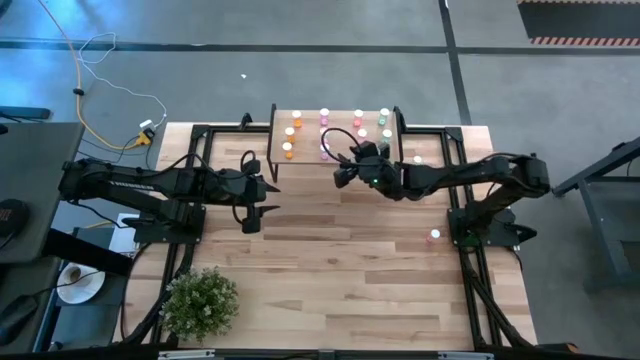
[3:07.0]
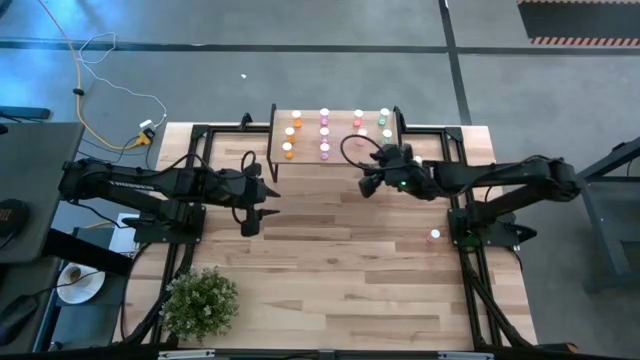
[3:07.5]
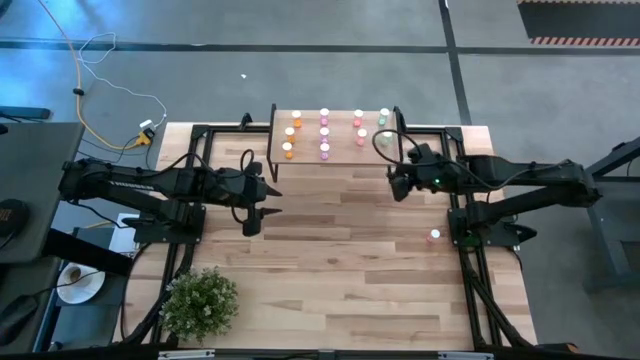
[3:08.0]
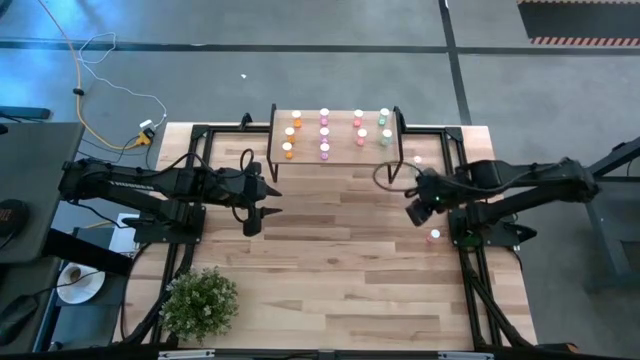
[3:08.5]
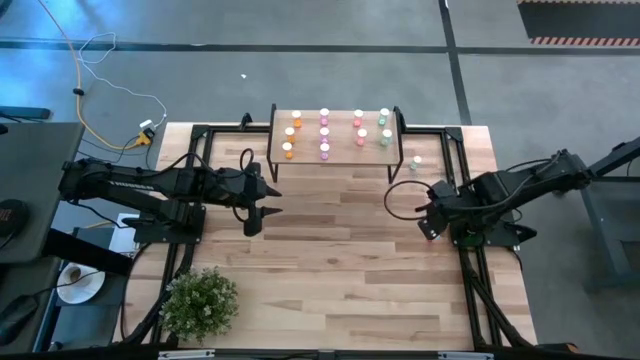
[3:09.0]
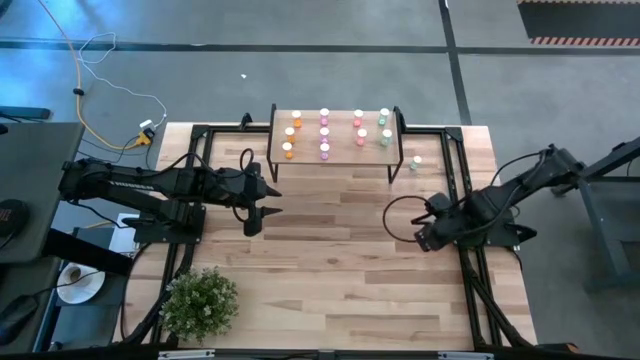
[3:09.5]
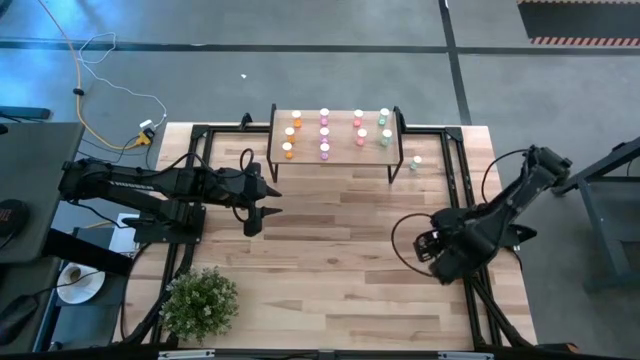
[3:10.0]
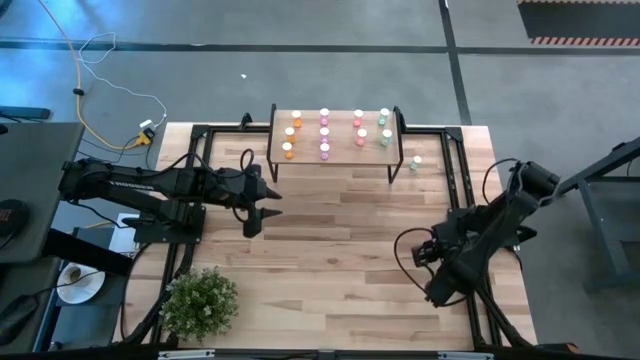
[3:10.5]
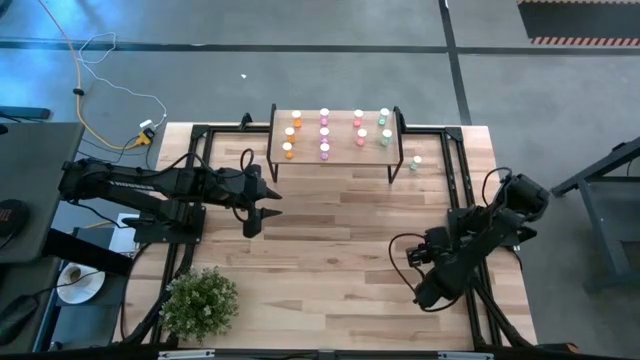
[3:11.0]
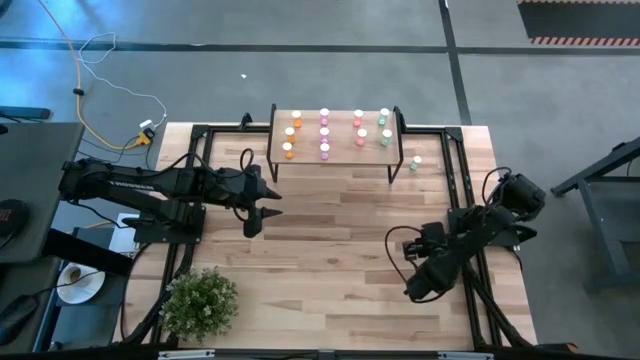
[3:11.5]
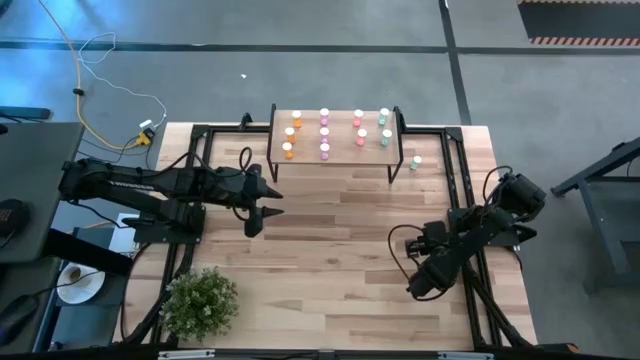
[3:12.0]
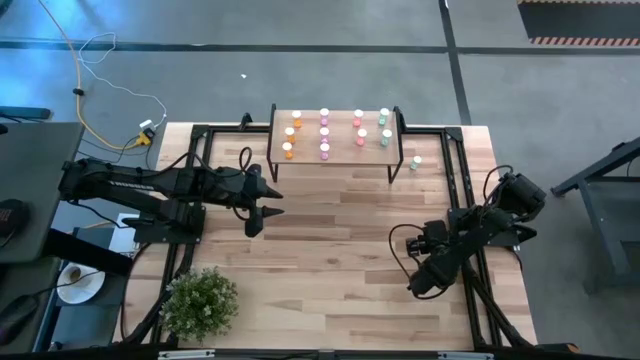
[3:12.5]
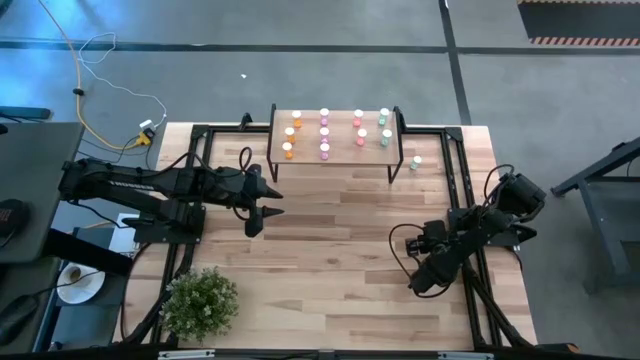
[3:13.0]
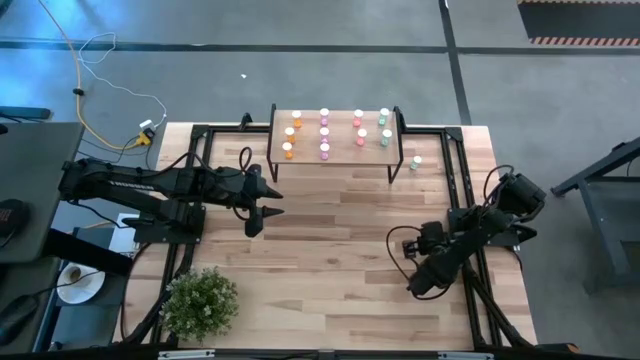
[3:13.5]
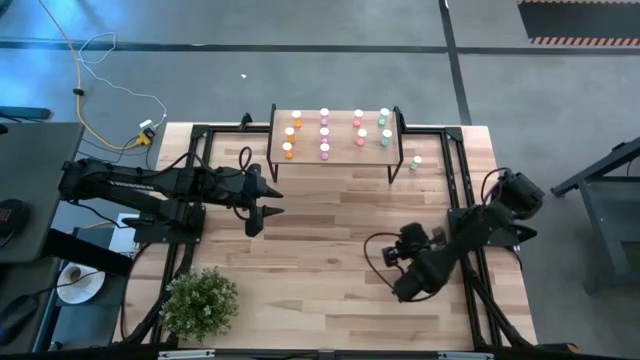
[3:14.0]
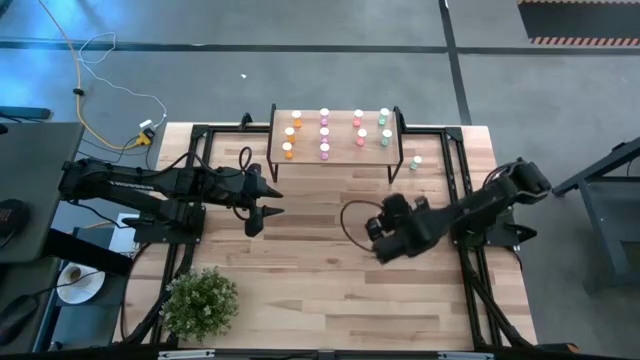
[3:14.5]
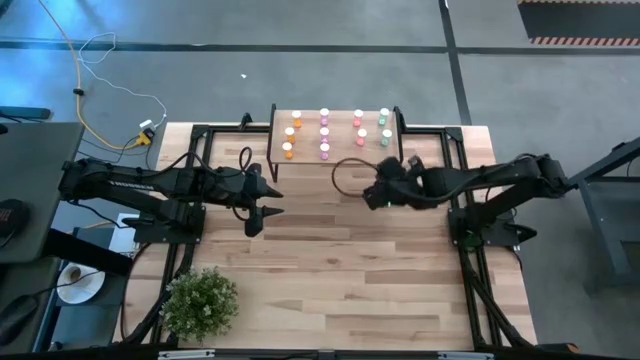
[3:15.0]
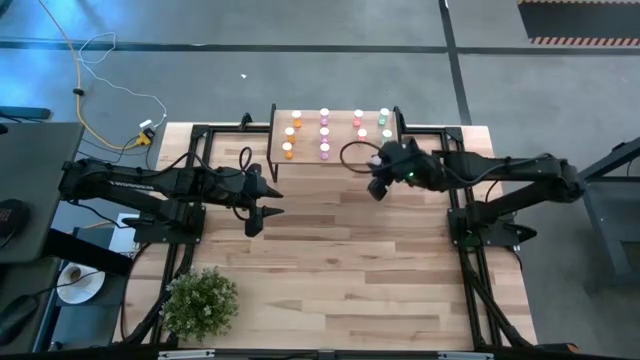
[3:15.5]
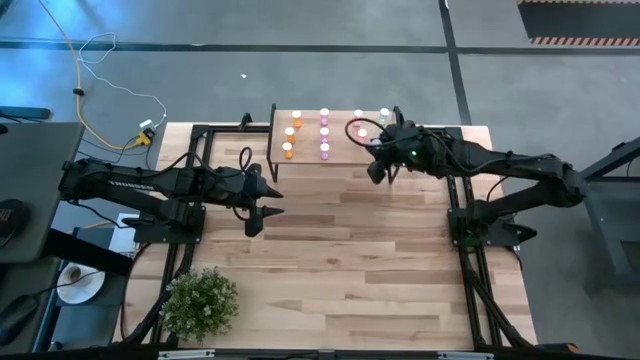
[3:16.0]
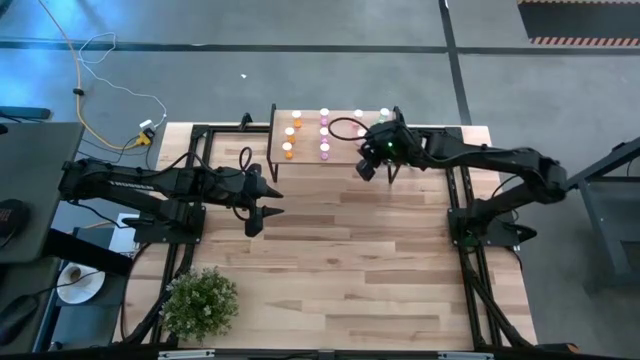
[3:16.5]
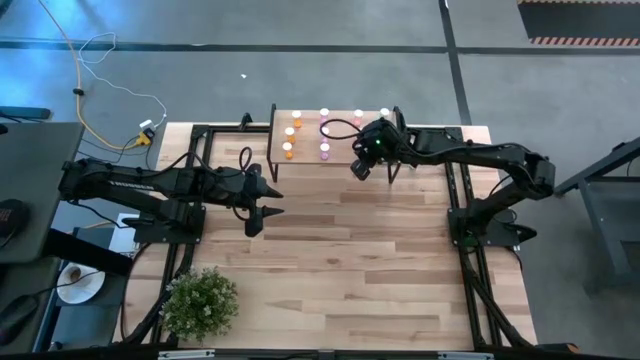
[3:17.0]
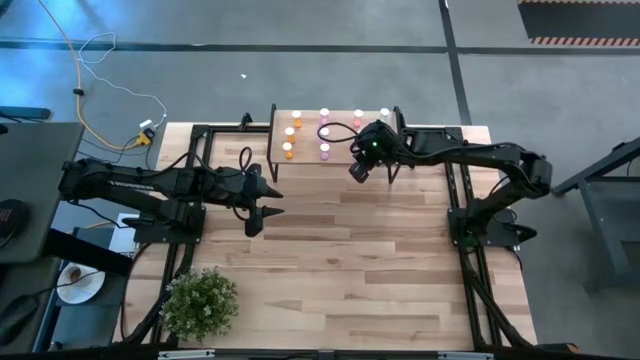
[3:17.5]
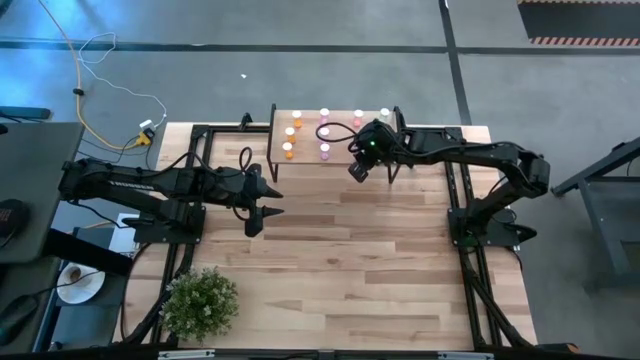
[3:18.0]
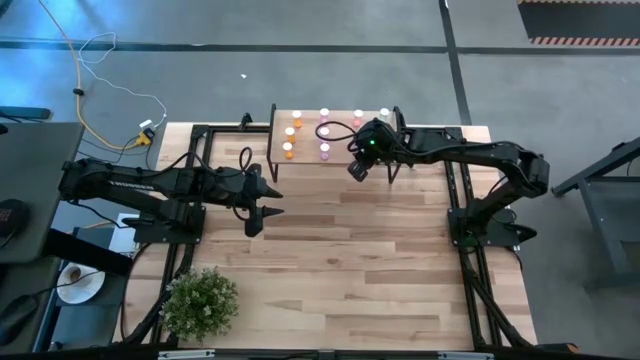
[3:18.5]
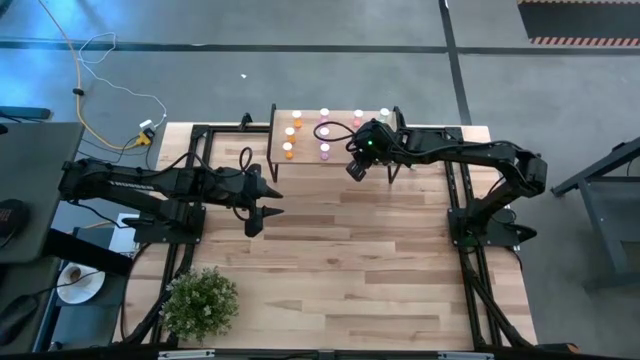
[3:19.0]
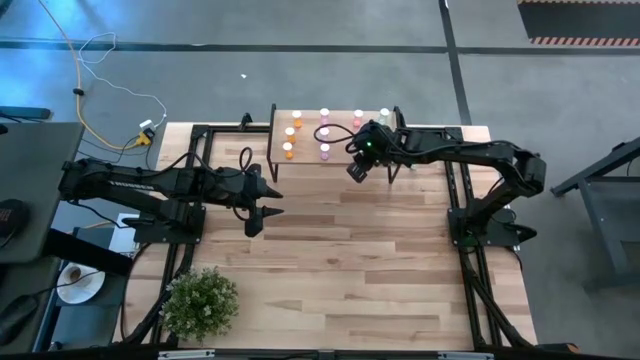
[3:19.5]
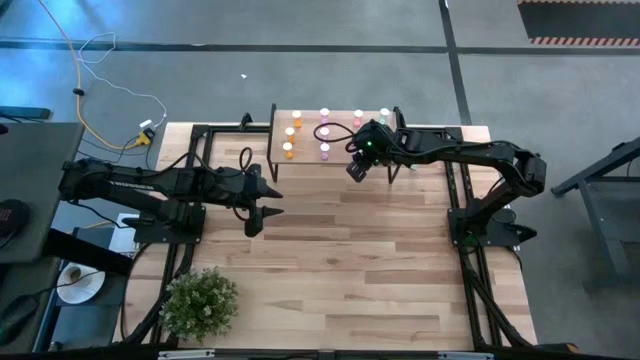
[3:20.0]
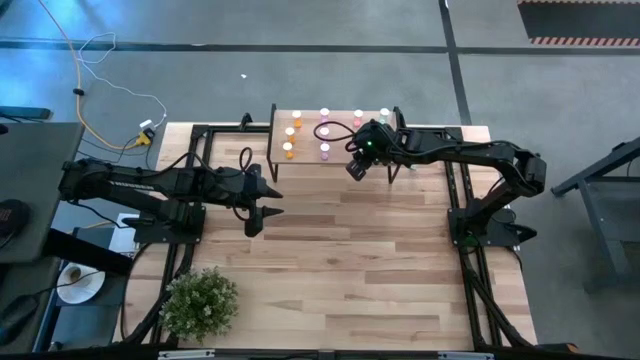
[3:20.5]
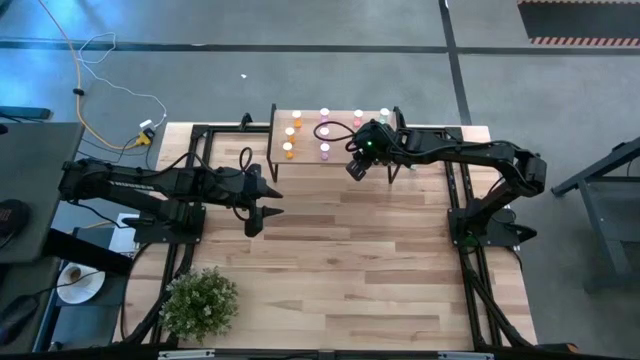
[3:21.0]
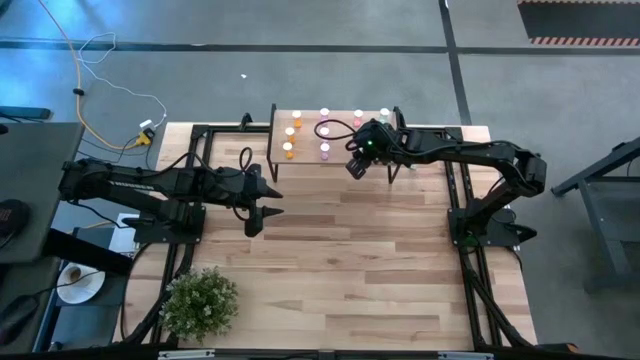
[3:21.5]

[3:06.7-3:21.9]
Task: Pick and place medicine bottles onto shelf by color
Put the red pill bottle on the shelf aligned with the other red pill bottles

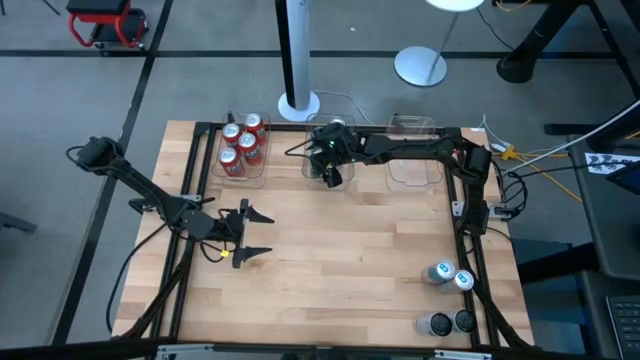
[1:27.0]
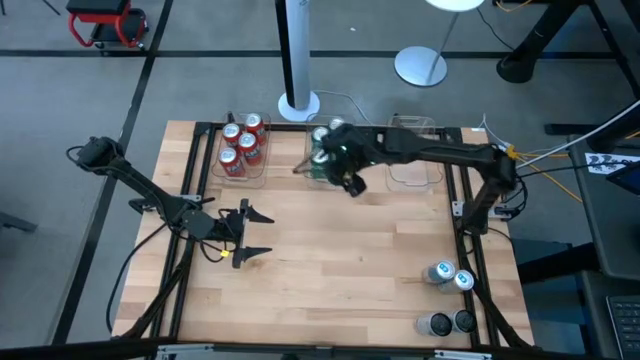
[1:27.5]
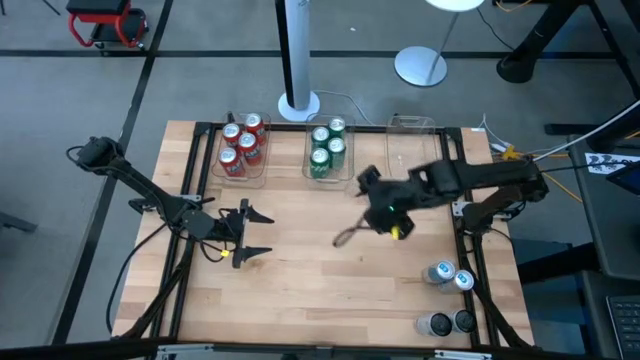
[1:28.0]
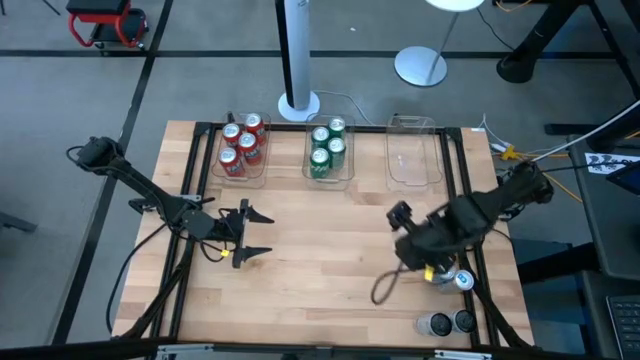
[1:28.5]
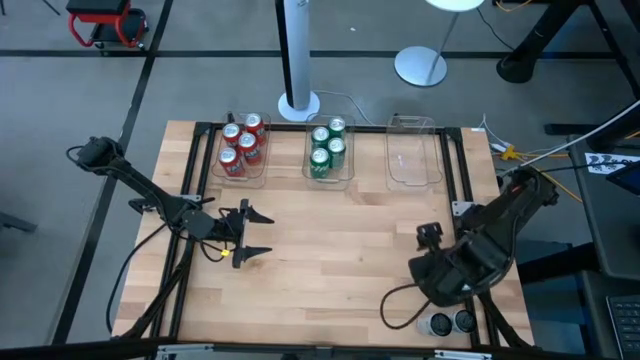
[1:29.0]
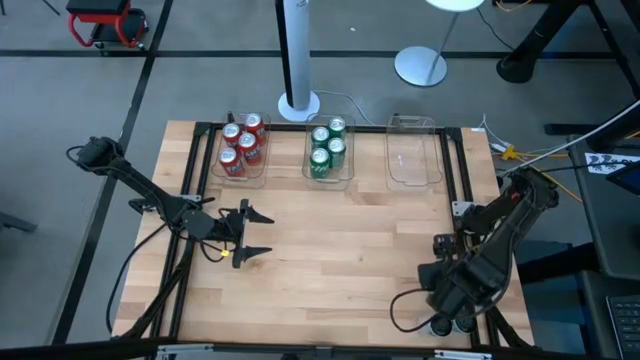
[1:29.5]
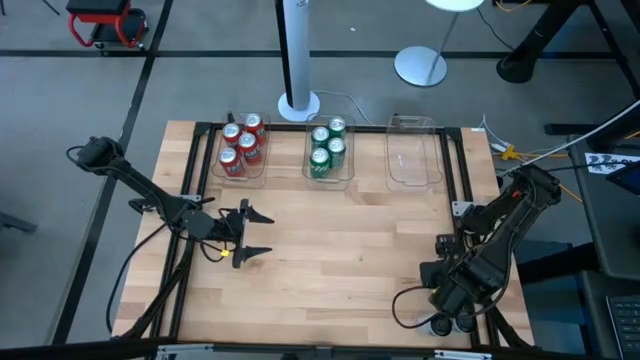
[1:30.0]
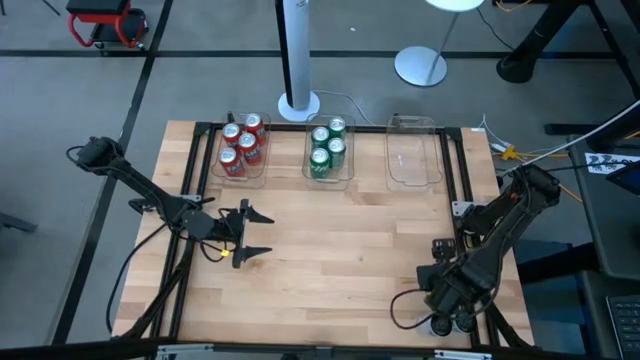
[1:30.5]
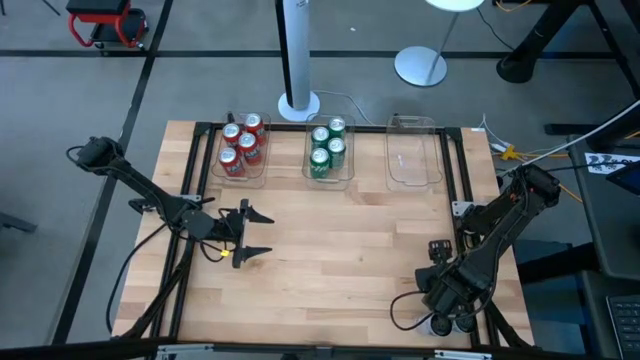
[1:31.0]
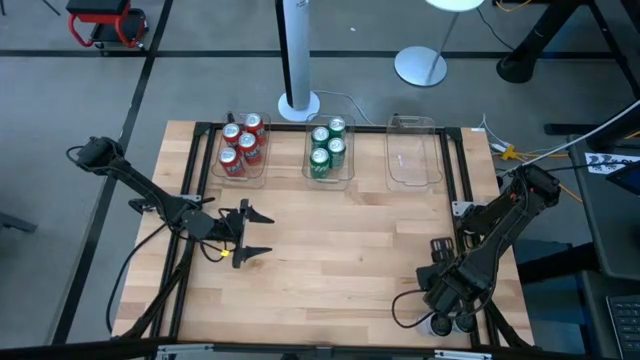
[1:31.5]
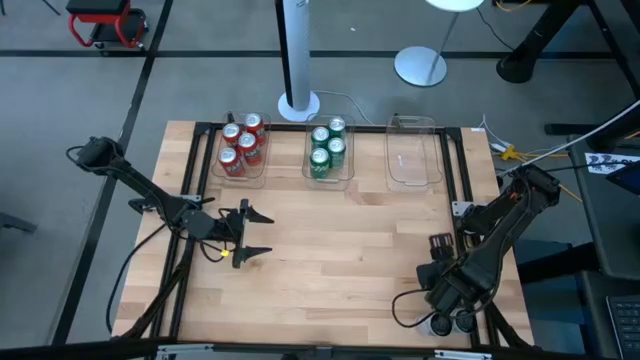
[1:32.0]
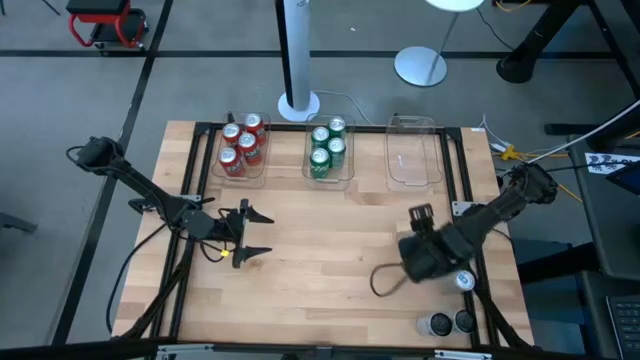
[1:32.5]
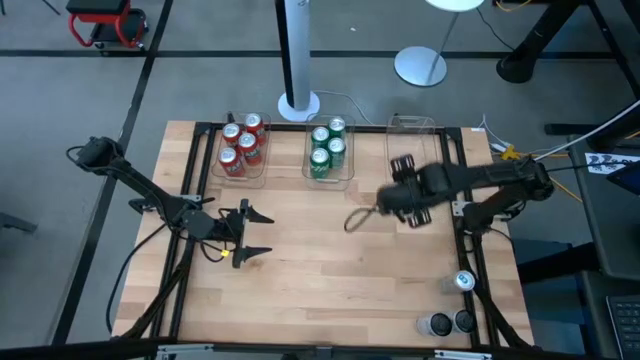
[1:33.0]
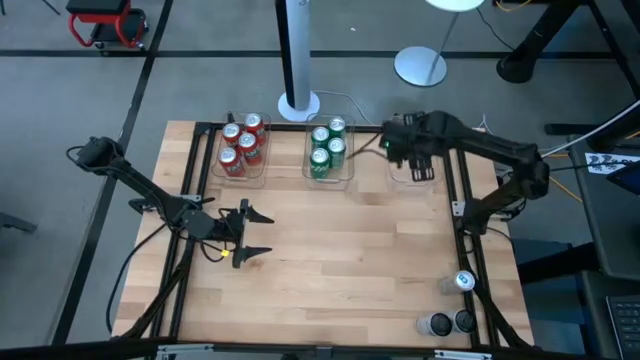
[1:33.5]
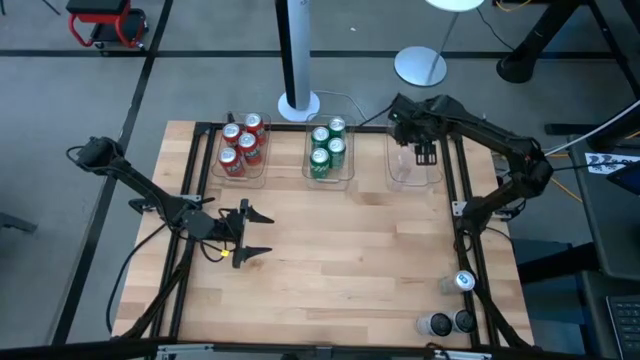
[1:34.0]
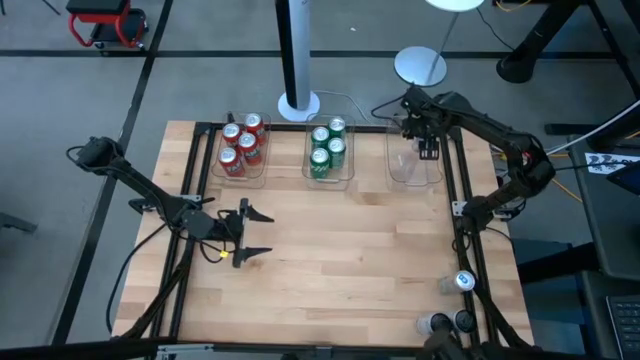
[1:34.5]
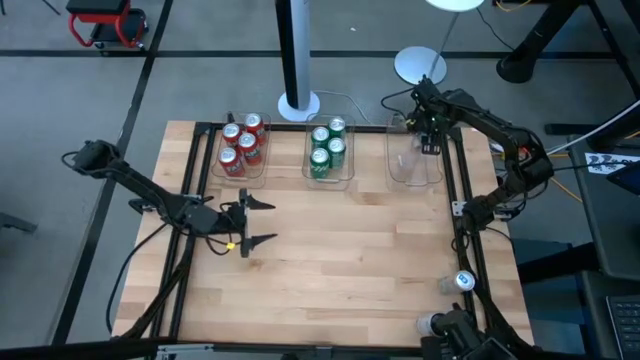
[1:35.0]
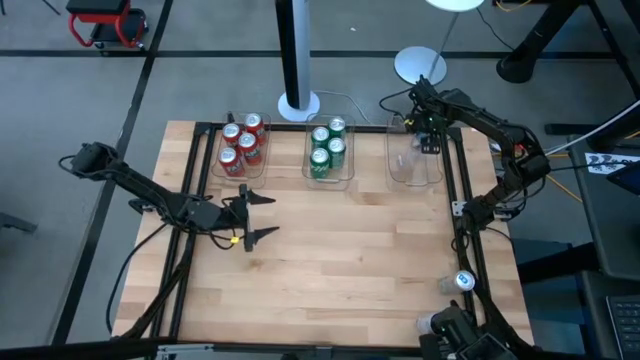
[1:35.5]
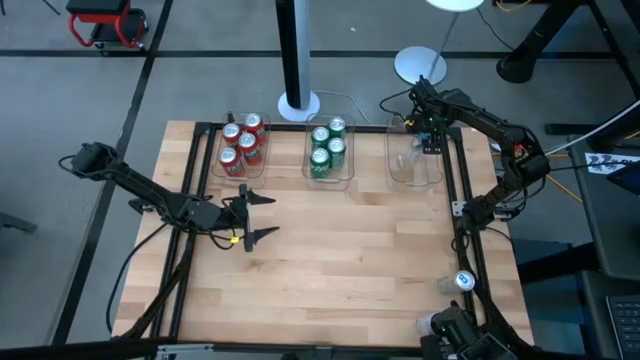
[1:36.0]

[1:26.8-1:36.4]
Task: Sort soda cans
Put the left blue soda can into the right transparent bin
